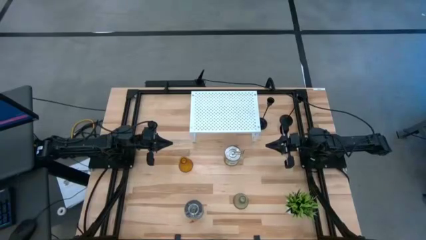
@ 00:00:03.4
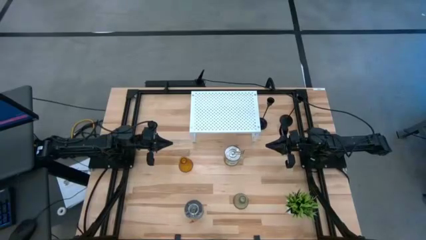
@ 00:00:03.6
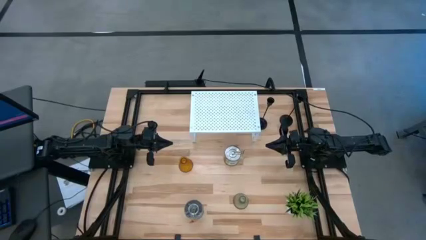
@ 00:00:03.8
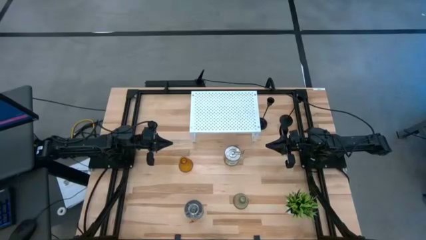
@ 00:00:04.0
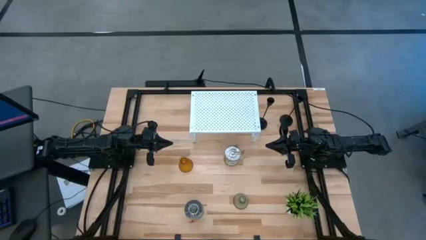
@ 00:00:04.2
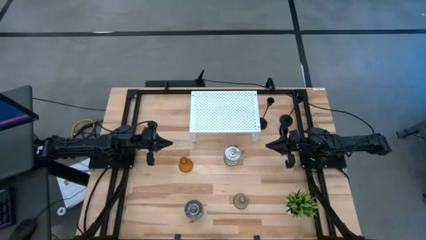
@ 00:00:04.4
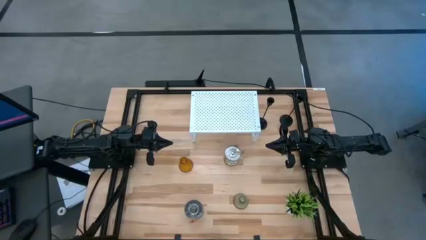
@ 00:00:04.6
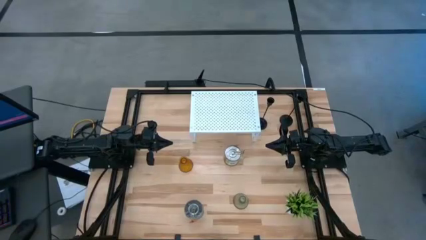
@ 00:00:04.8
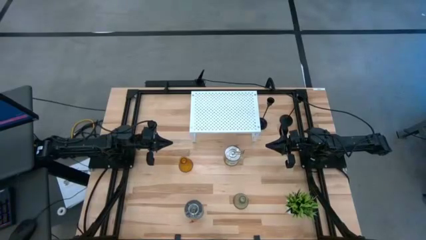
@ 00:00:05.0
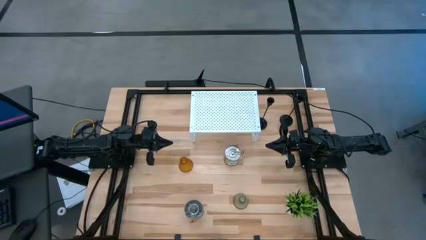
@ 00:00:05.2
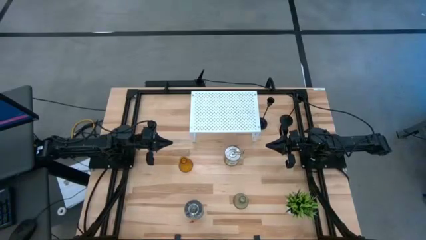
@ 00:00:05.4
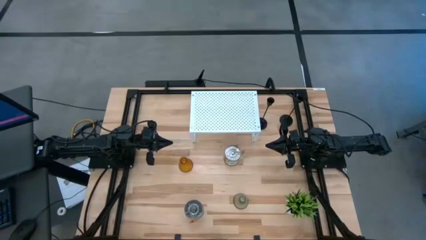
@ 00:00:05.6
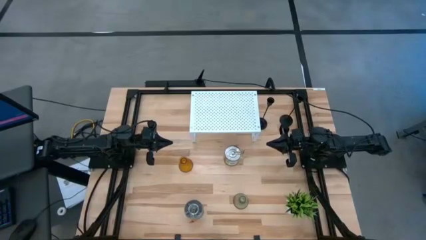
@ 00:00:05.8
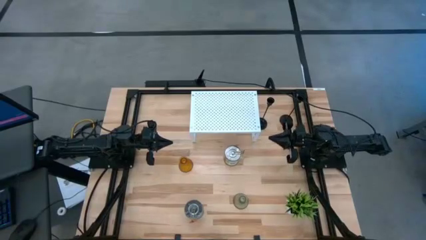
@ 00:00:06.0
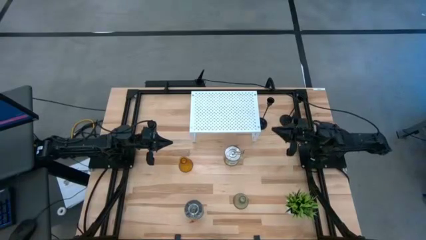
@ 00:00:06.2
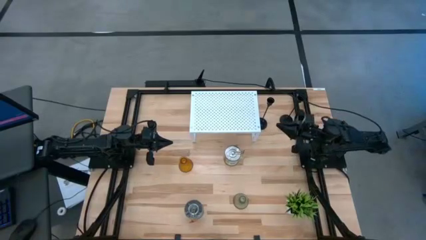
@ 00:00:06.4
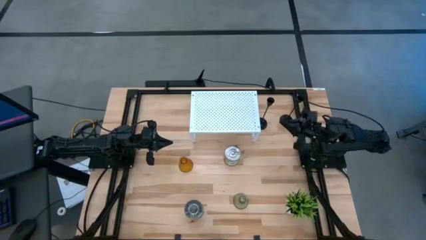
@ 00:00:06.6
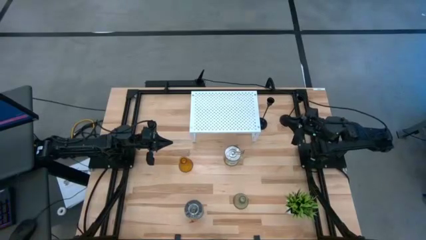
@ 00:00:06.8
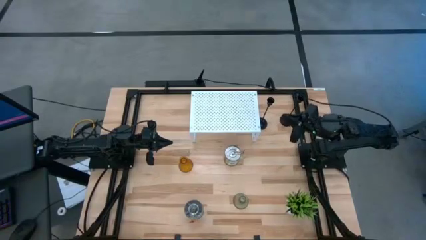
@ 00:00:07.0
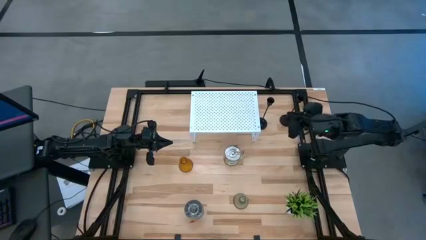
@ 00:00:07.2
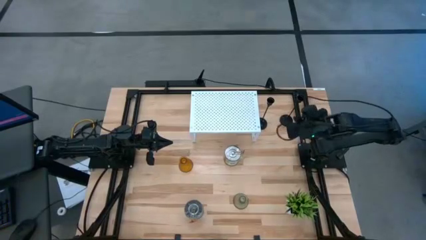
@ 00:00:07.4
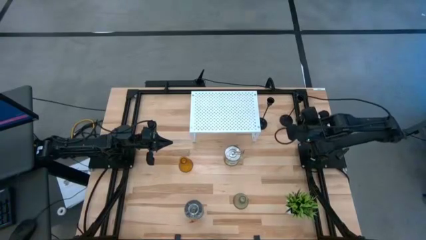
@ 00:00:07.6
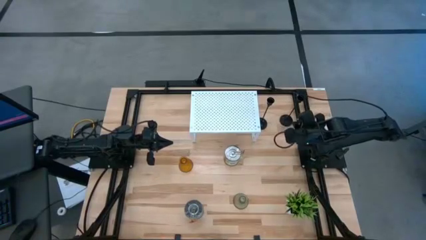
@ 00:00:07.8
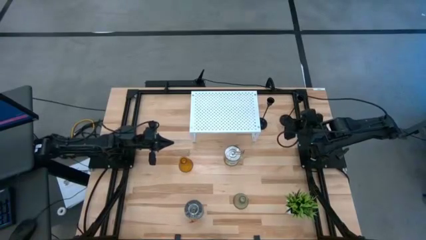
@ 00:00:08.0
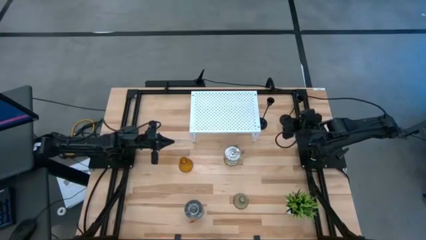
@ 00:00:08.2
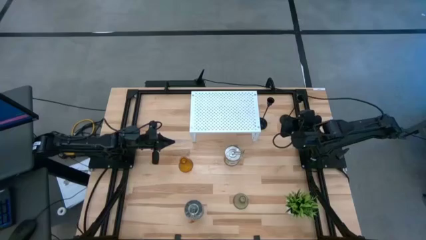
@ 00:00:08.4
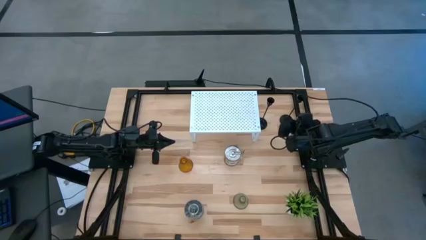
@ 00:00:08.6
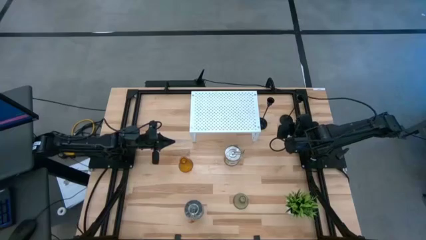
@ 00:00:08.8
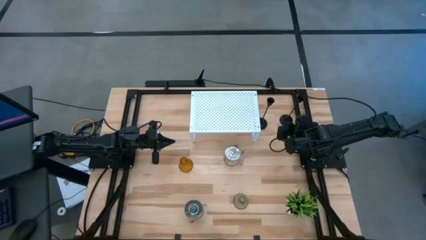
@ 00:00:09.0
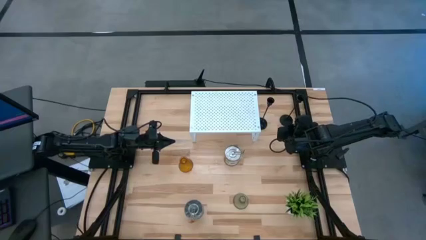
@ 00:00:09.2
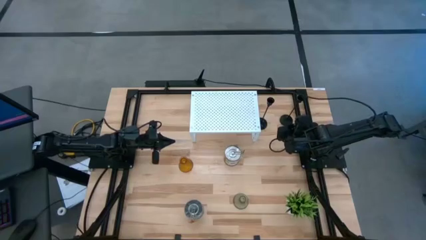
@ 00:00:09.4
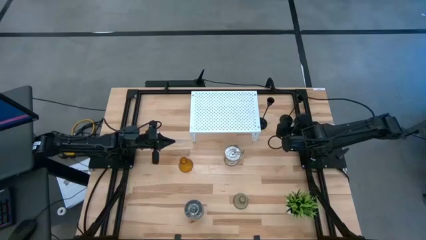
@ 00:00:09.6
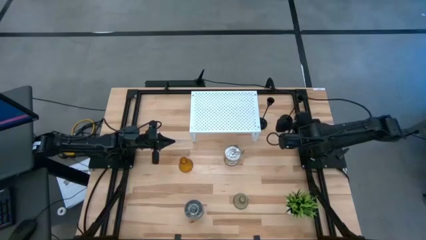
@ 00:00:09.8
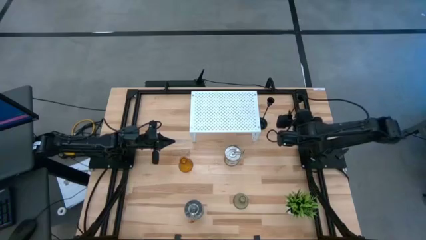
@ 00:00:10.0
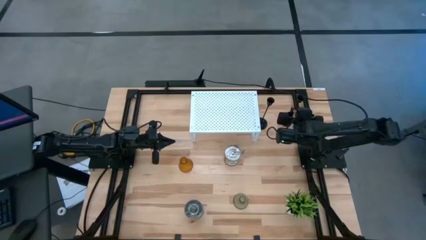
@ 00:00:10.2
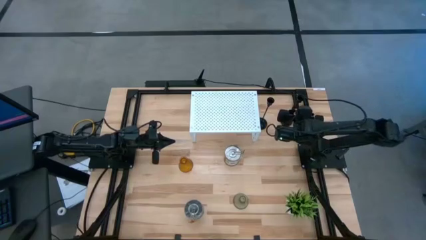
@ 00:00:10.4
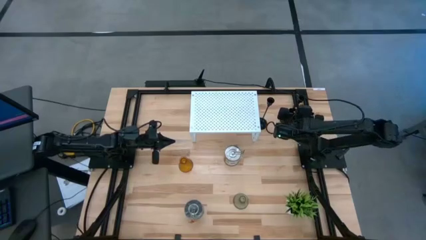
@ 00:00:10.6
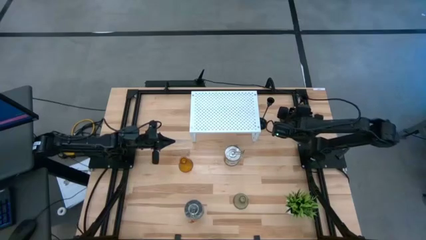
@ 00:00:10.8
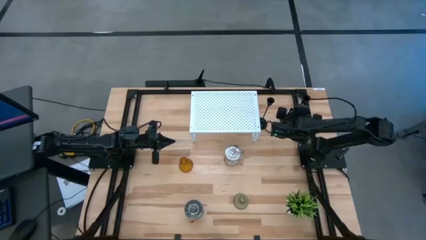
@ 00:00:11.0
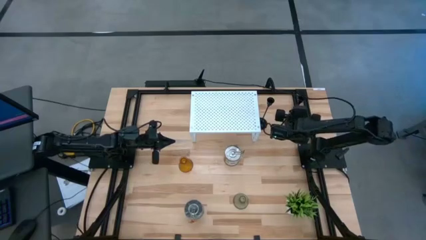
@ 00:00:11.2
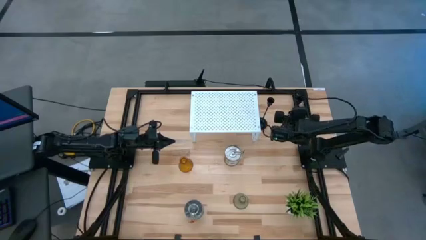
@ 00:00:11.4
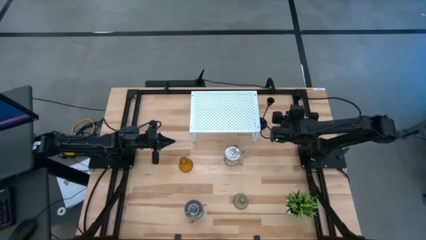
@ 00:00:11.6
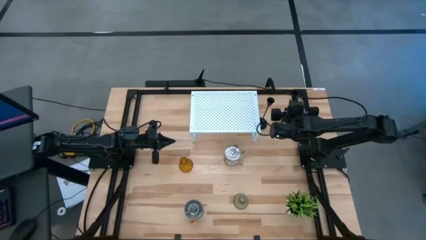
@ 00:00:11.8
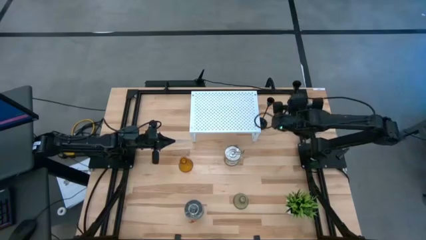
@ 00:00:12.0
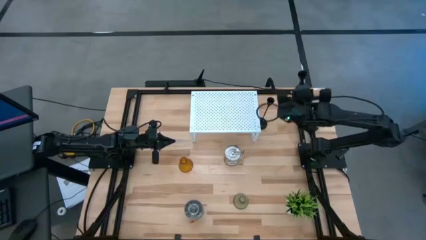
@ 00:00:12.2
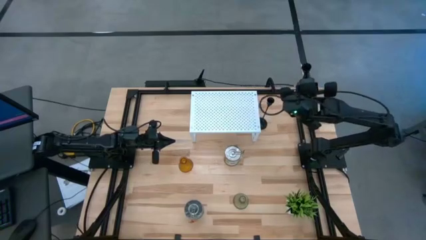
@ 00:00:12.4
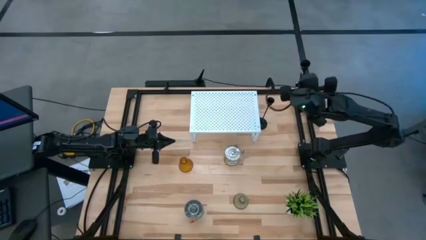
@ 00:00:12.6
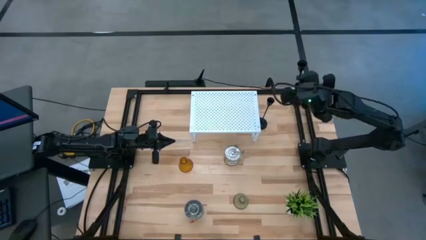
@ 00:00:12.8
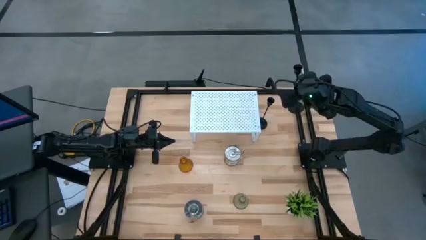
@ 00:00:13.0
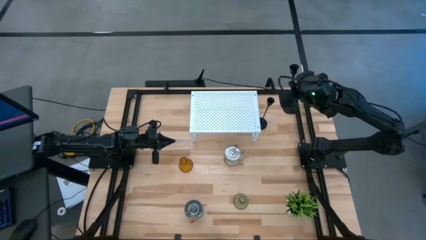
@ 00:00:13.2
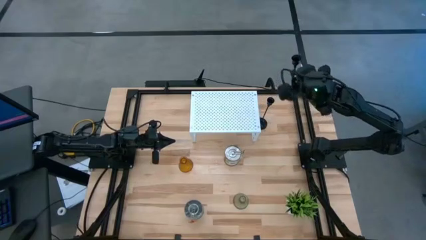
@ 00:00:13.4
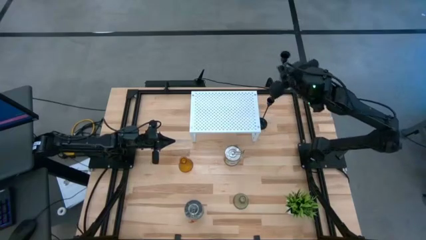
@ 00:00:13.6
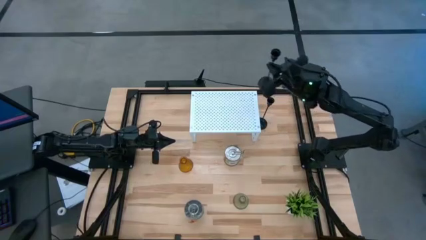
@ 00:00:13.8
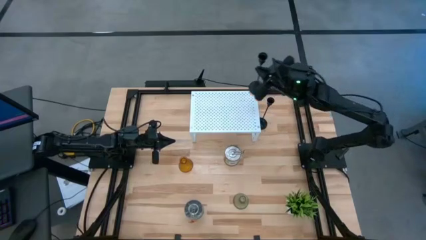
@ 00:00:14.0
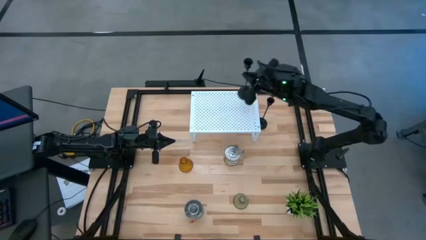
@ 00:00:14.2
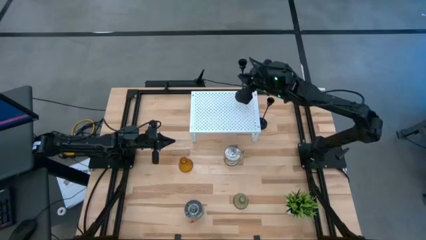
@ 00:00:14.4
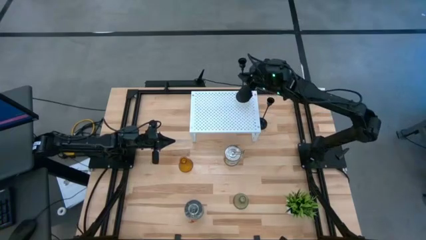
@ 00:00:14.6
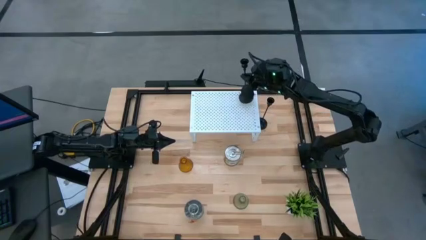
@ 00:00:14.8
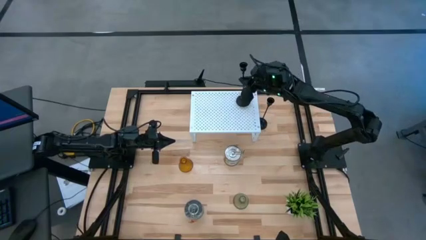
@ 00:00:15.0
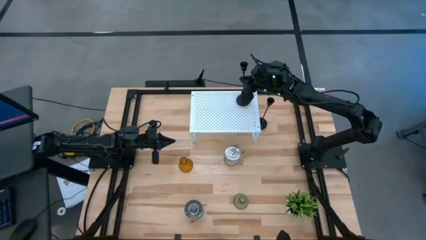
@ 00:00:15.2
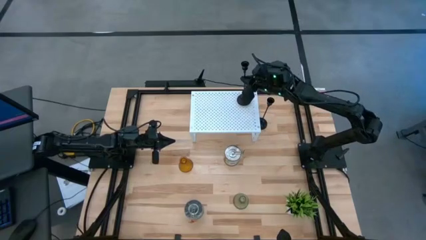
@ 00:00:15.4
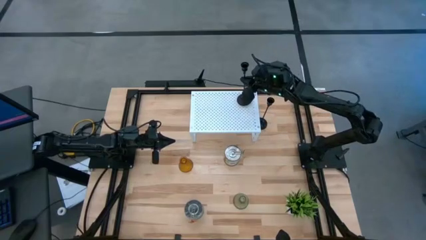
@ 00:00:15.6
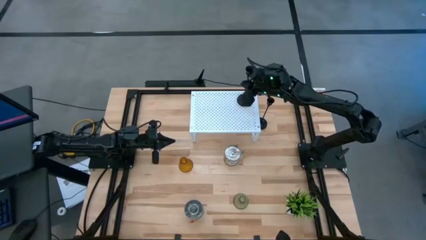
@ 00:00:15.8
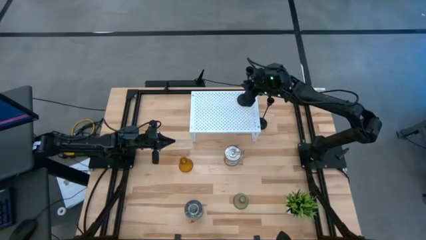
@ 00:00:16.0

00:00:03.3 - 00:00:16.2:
Task: Pick & Place candle stick holders
Put the right black candle holder on the shelf
